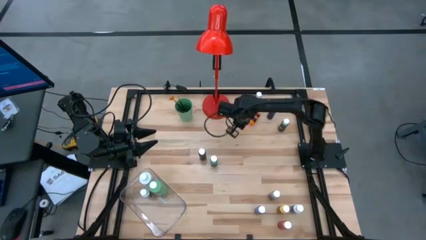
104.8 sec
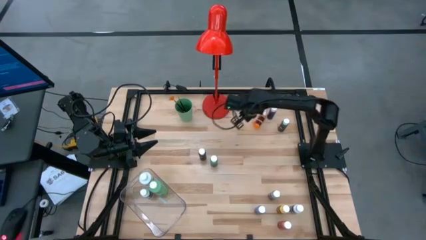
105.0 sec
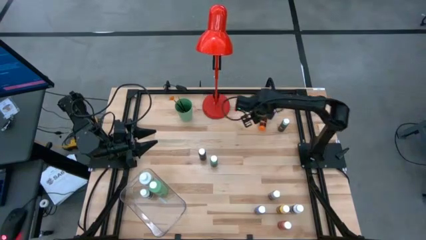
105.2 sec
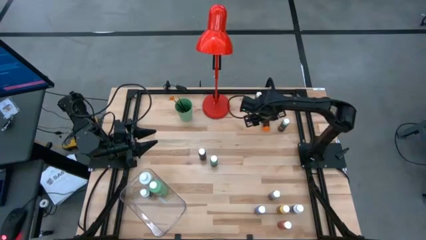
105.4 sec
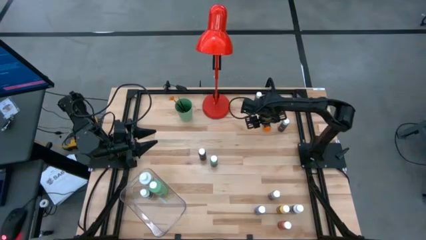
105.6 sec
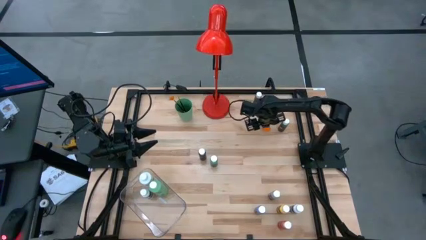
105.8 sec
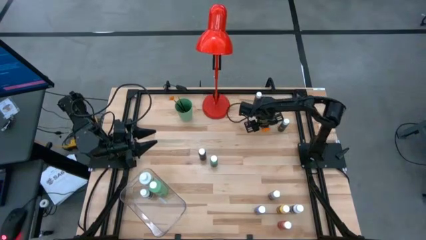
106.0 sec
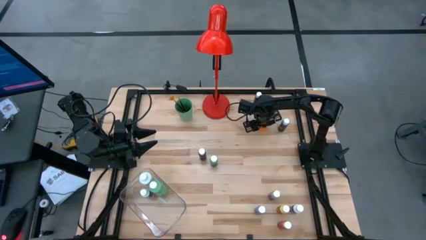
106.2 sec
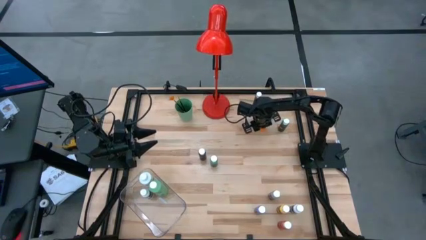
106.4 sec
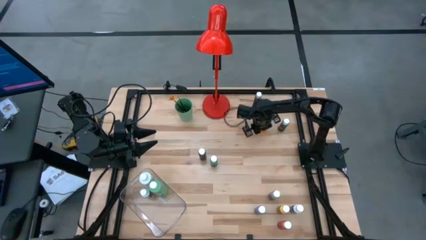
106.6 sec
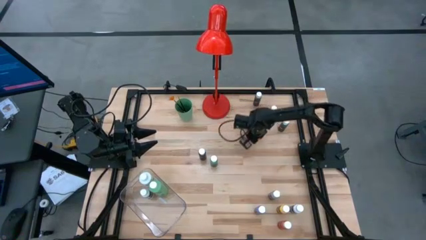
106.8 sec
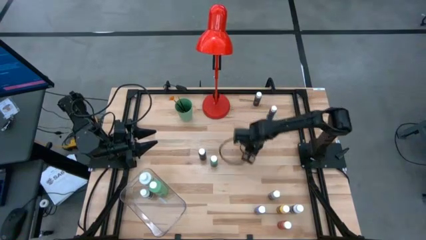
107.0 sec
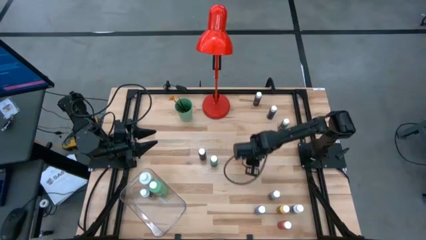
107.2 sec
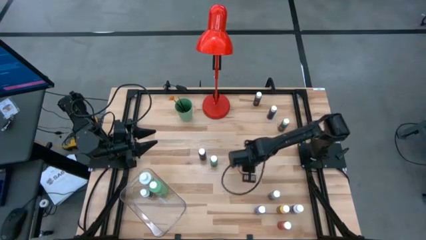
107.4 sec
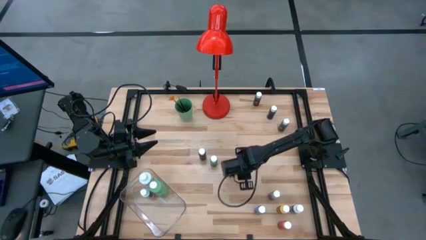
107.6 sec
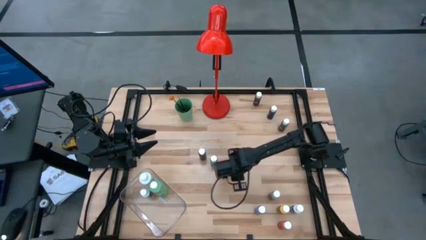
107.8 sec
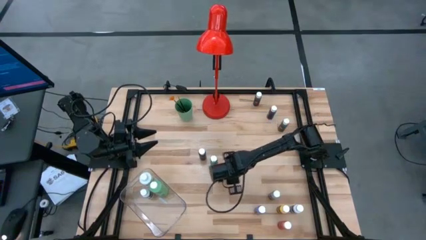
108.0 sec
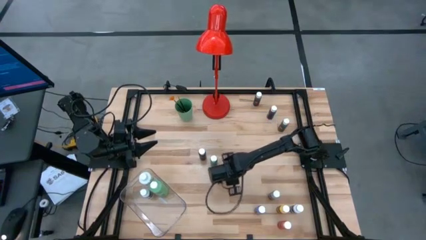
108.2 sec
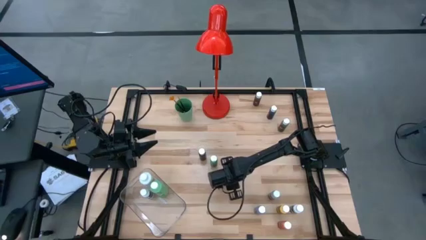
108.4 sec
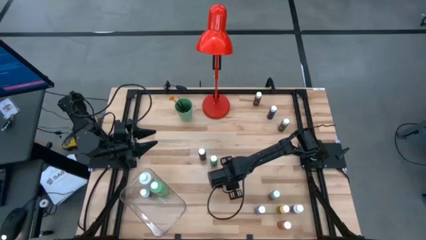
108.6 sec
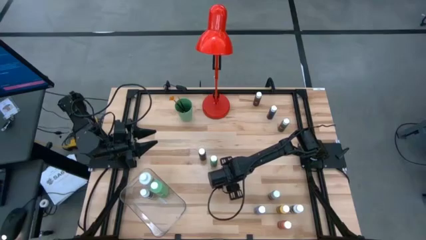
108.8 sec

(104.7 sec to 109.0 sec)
Task: Pick & Place Paint Supplies
Move the orange coloring bottle to the center of the table

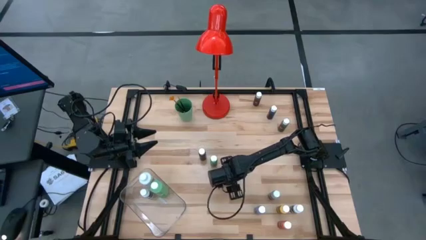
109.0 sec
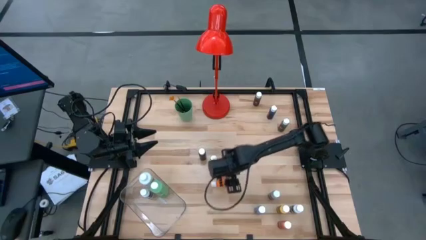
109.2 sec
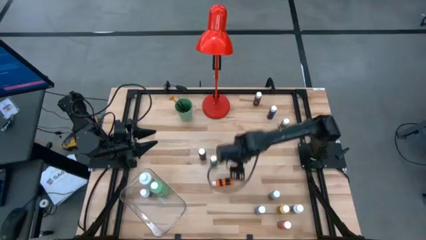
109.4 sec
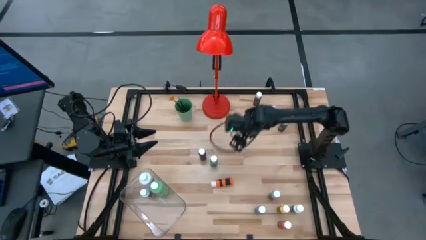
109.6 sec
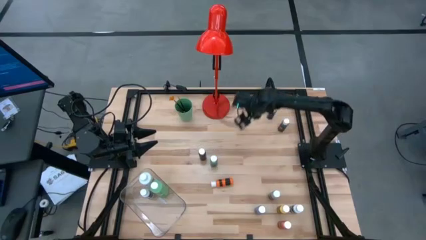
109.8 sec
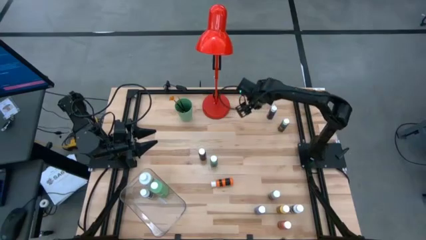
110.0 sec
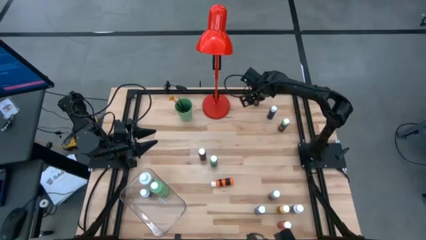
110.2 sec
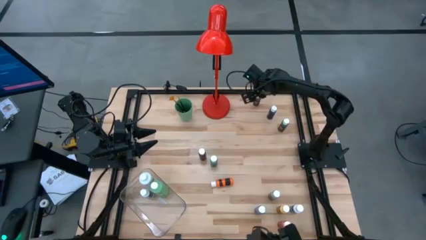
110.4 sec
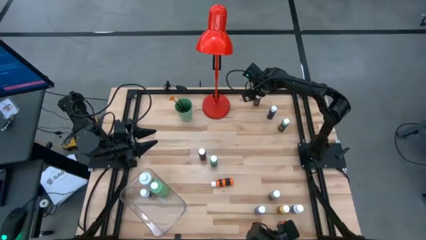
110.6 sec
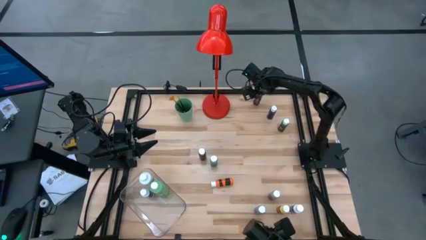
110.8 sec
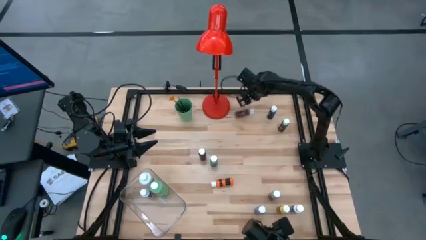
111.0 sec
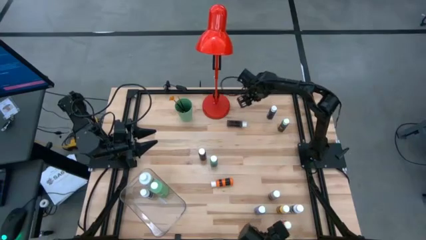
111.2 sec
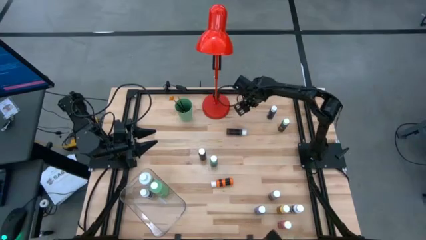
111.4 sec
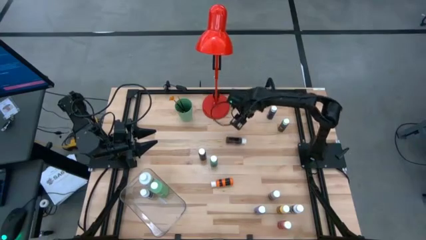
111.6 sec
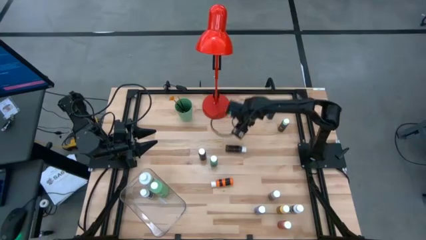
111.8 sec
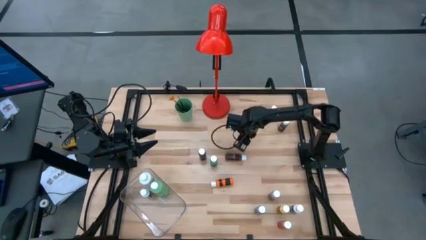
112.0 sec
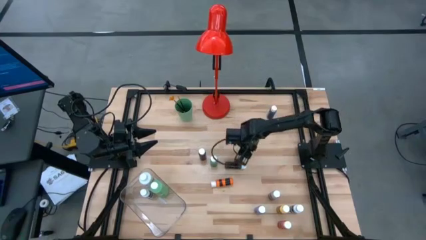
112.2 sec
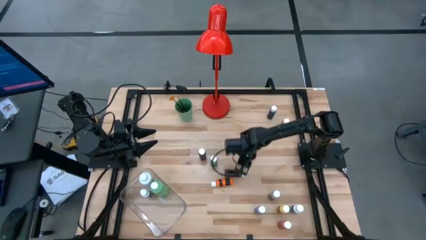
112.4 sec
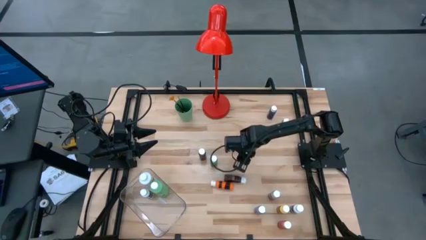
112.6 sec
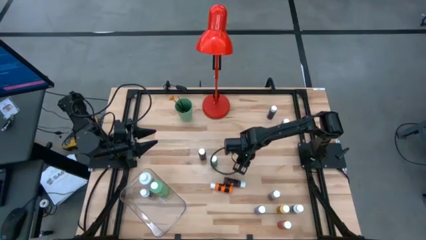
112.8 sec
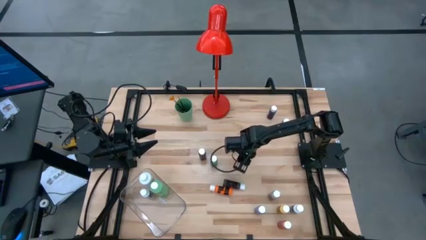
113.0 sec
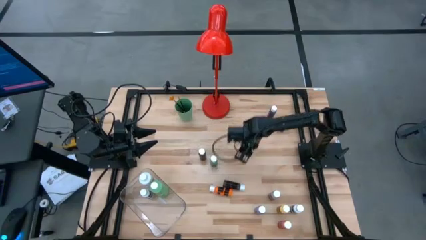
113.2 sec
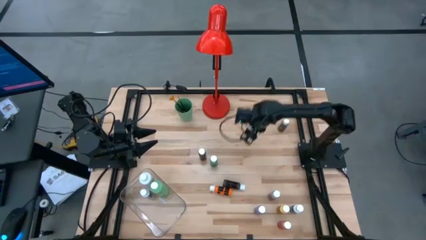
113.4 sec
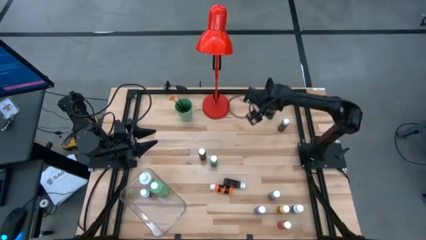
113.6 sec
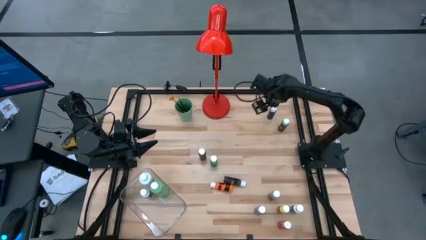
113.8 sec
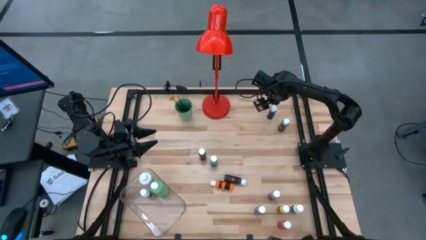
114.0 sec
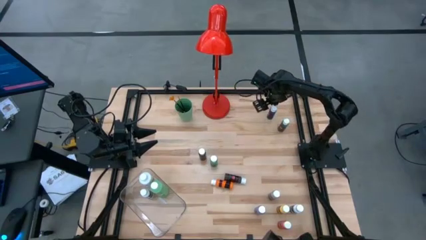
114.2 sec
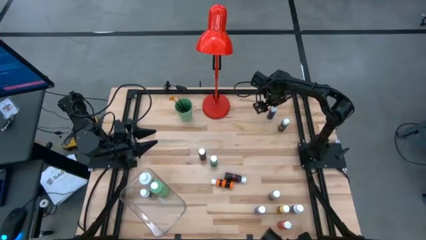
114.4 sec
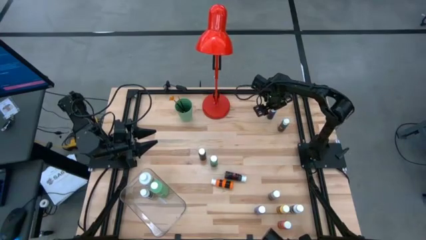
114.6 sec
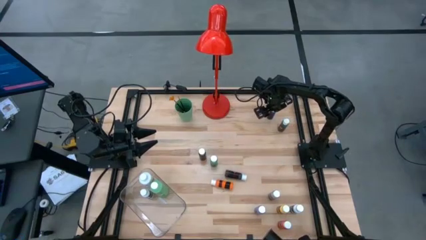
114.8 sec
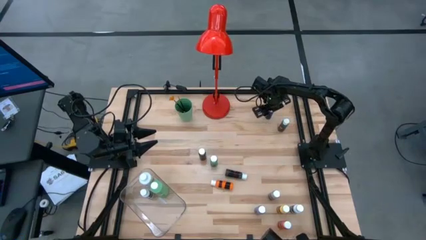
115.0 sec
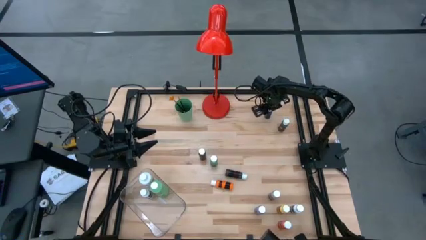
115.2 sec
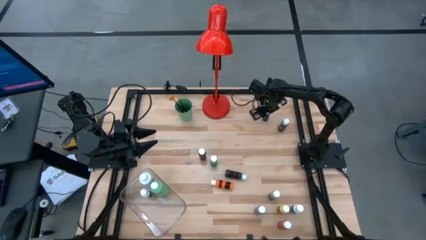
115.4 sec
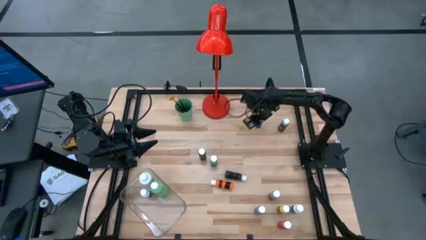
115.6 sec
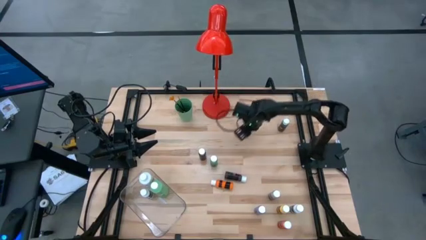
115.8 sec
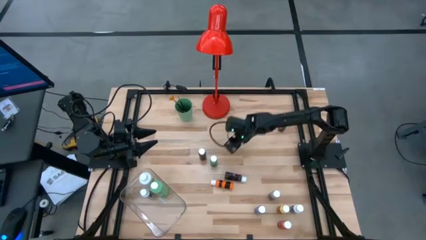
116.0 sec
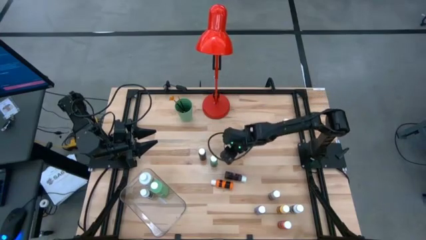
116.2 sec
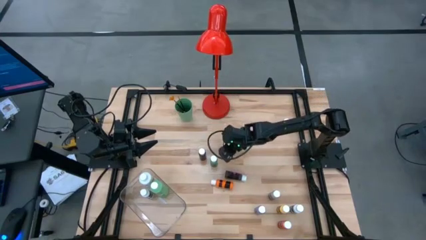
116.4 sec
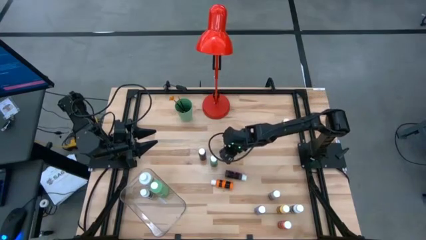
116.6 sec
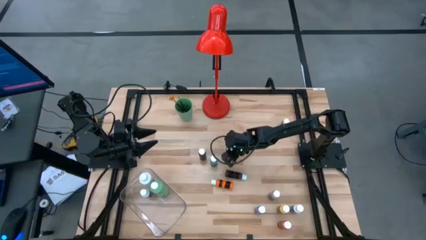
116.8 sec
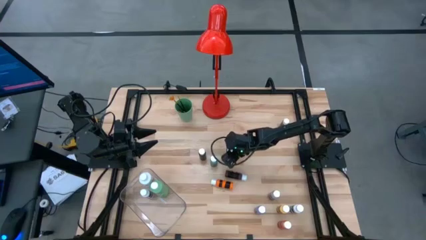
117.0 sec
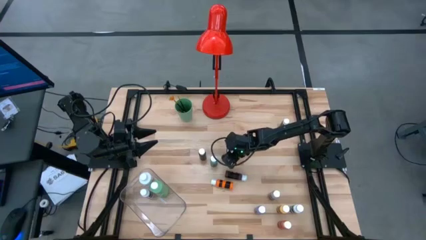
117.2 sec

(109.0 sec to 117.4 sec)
Move the brown coloring bottle to the center of the table

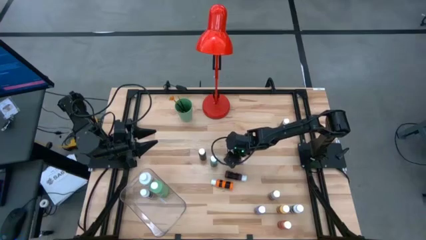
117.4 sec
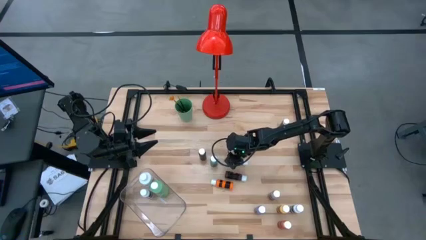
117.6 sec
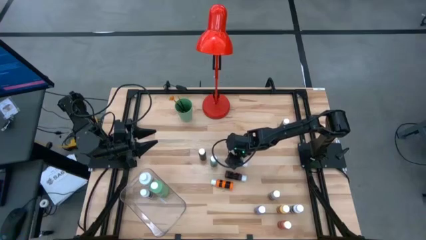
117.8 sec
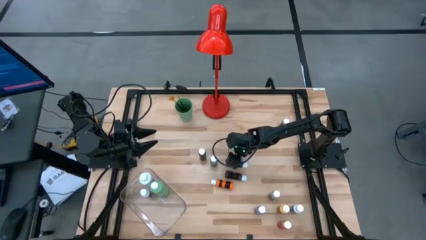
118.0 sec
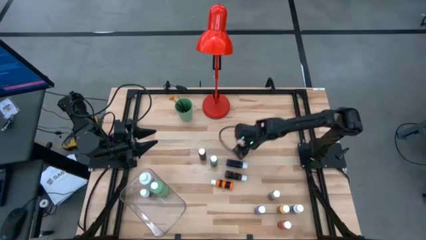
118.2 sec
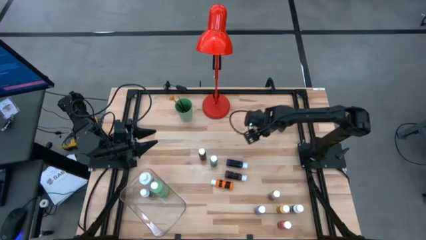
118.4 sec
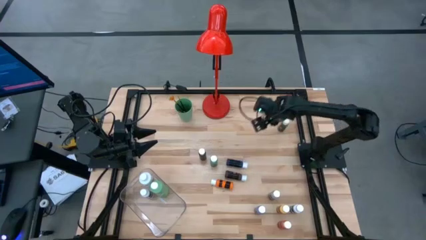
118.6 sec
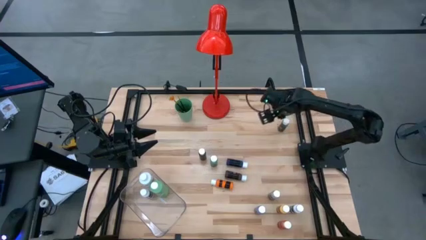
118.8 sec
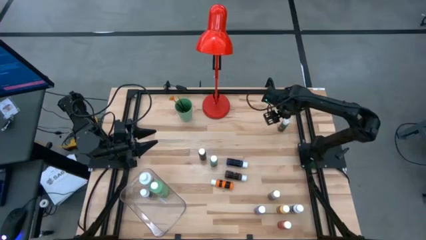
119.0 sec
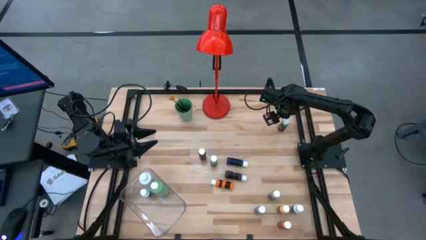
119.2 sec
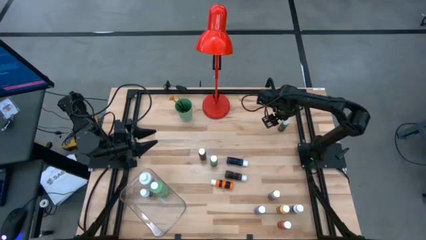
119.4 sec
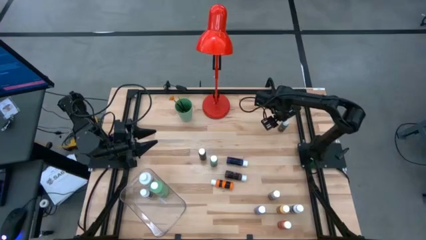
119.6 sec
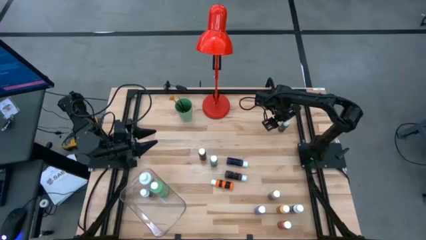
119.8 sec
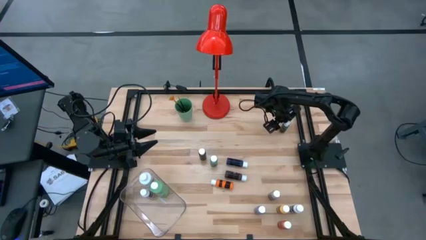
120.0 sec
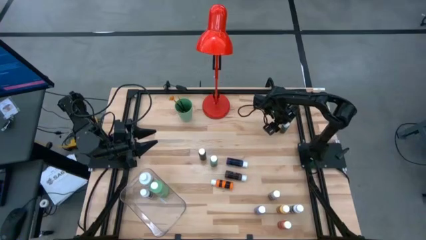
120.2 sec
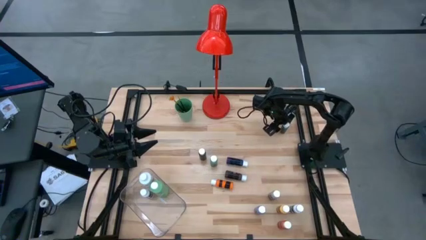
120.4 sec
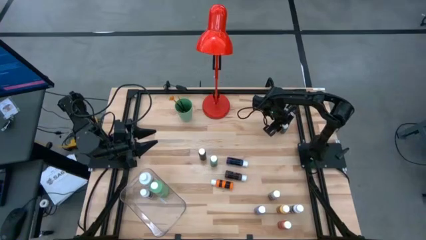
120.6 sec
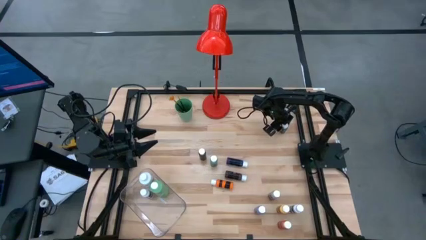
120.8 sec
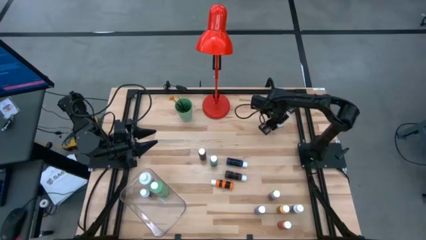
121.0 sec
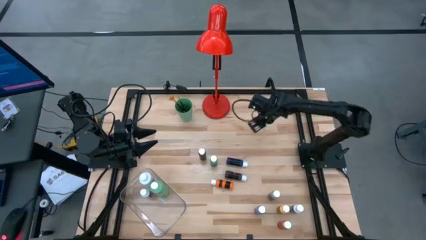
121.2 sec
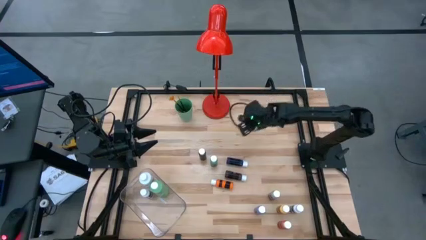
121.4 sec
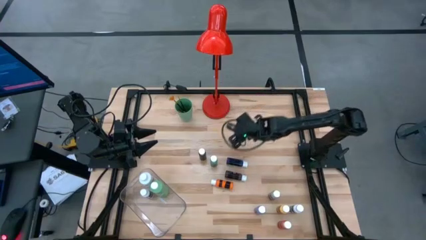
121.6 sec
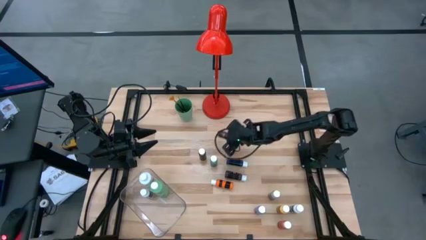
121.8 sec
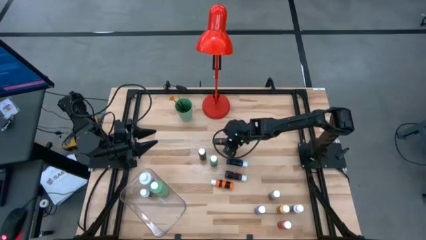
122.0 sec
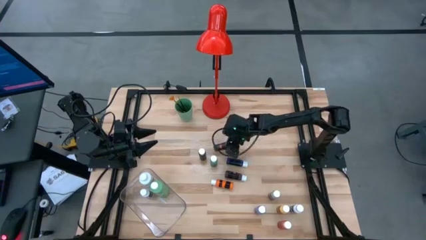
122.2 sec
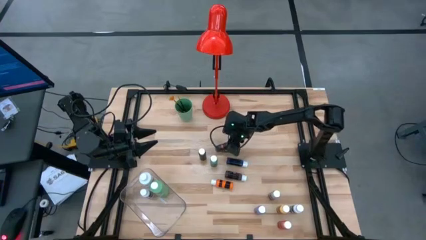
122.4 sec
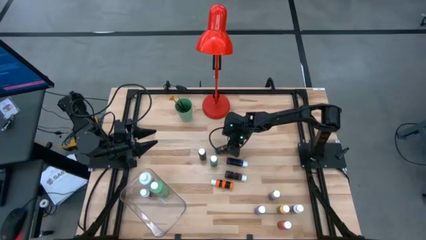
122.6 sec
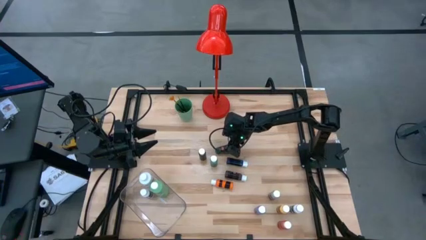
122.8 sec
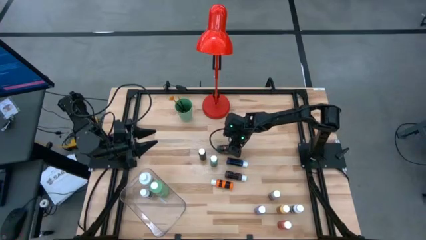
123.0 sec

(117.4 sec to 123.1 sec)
Move the brown coloring bottle to the center of the table
